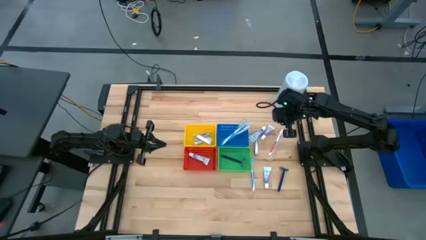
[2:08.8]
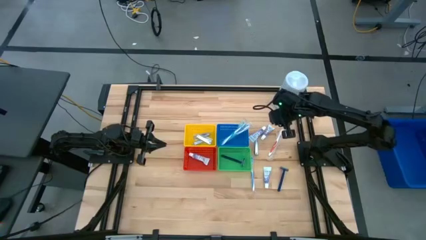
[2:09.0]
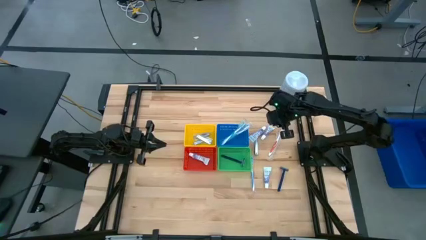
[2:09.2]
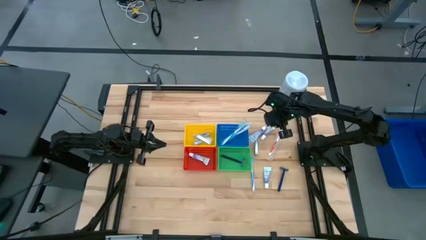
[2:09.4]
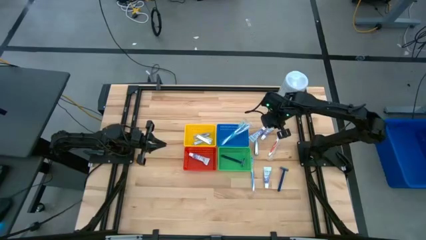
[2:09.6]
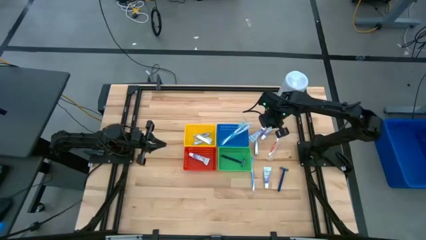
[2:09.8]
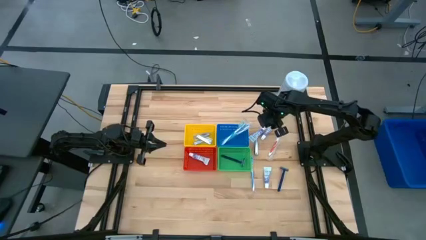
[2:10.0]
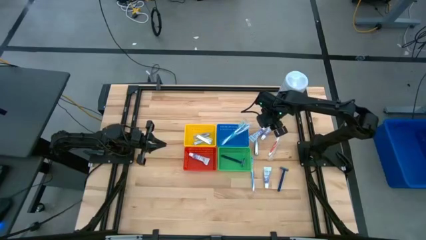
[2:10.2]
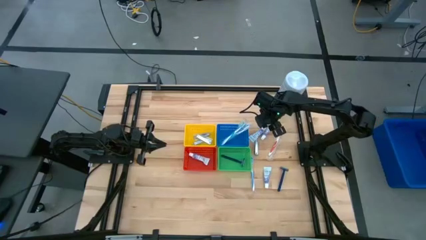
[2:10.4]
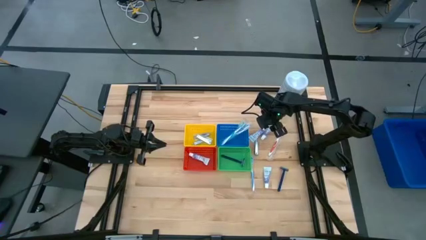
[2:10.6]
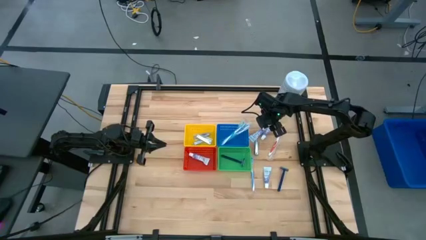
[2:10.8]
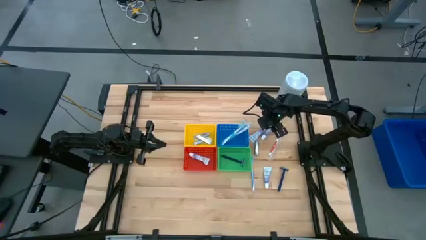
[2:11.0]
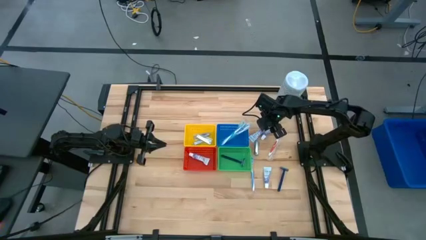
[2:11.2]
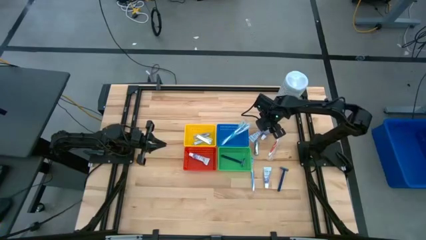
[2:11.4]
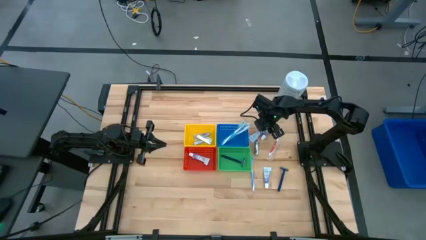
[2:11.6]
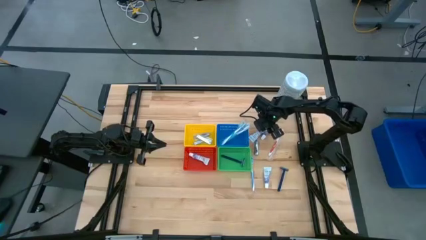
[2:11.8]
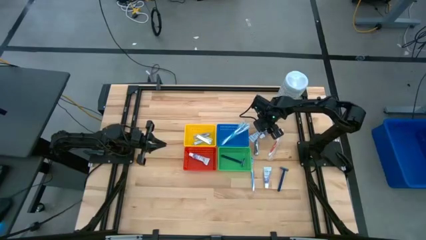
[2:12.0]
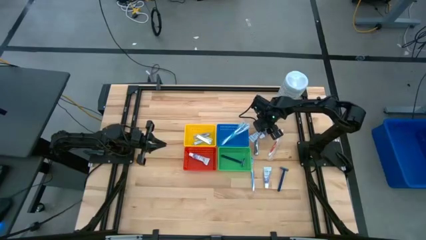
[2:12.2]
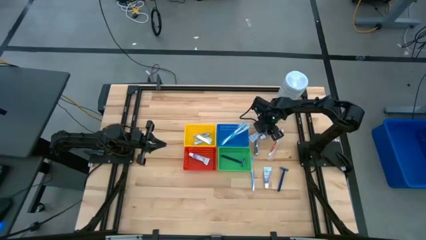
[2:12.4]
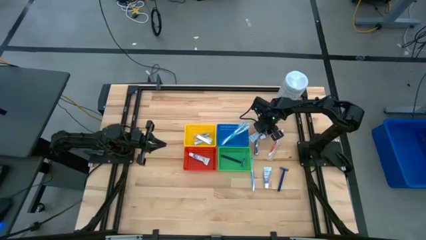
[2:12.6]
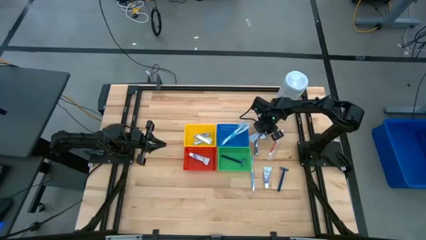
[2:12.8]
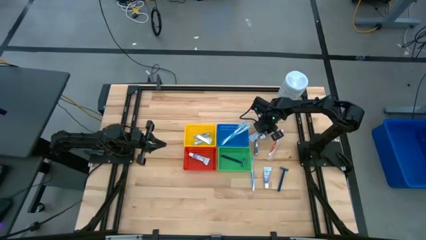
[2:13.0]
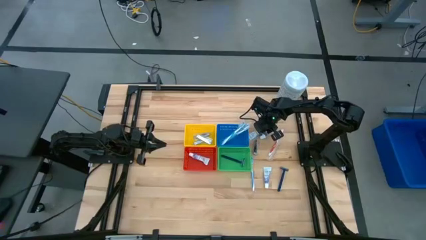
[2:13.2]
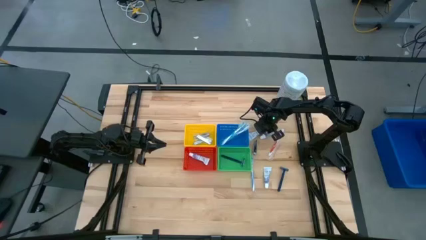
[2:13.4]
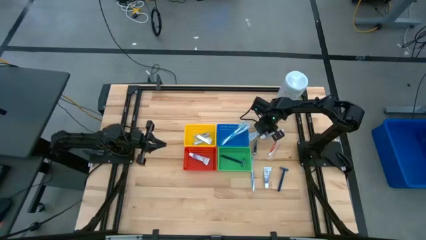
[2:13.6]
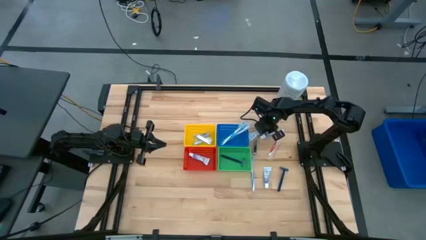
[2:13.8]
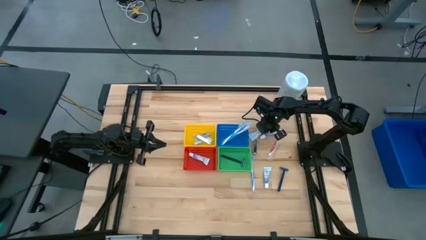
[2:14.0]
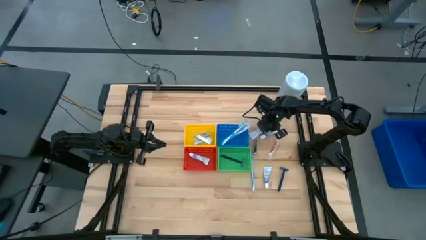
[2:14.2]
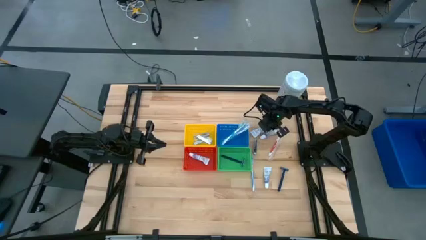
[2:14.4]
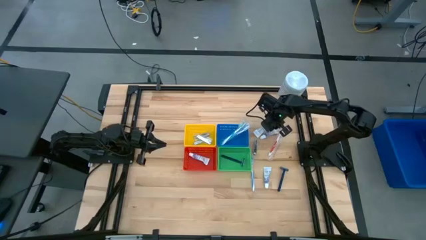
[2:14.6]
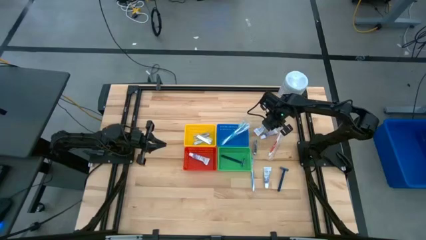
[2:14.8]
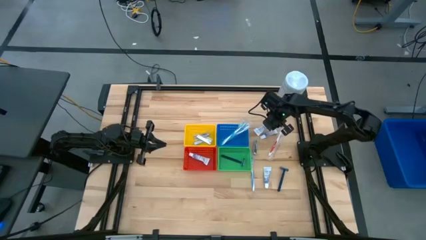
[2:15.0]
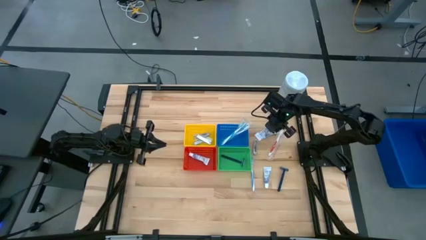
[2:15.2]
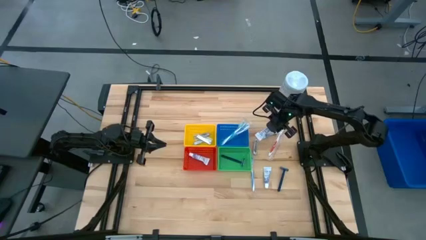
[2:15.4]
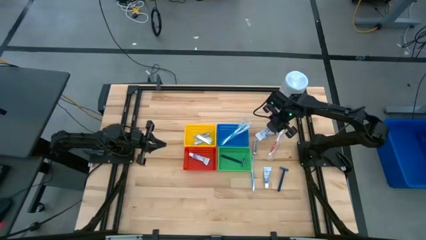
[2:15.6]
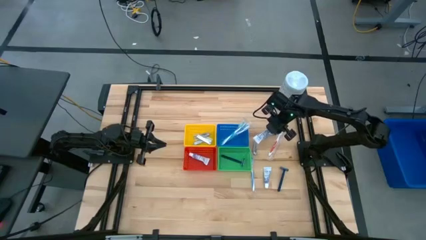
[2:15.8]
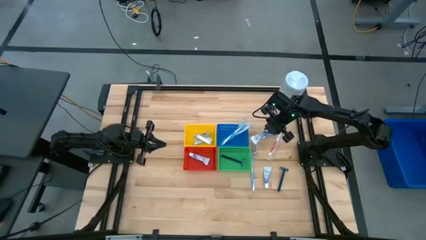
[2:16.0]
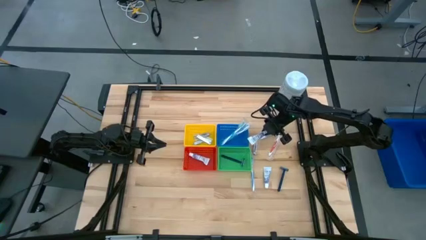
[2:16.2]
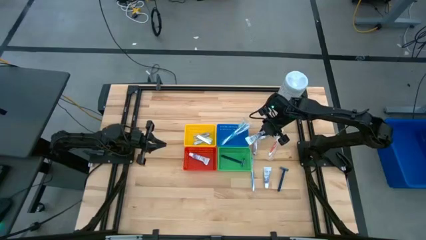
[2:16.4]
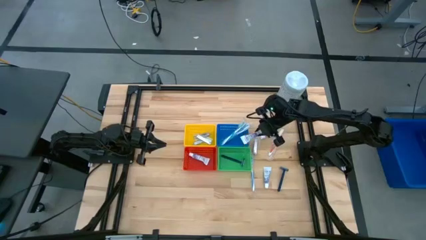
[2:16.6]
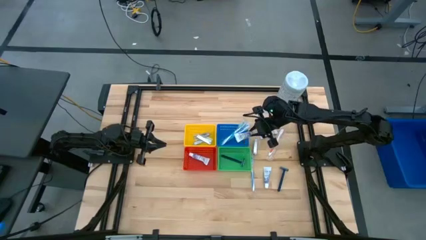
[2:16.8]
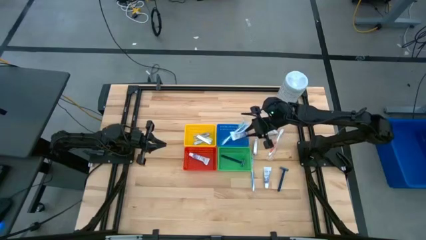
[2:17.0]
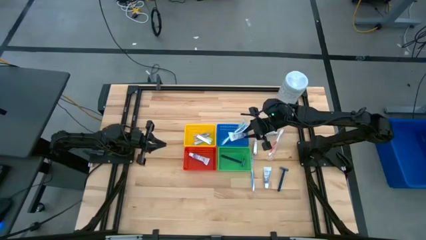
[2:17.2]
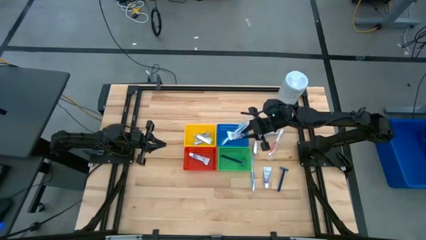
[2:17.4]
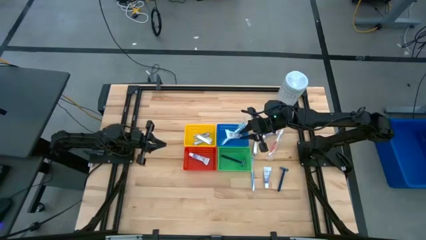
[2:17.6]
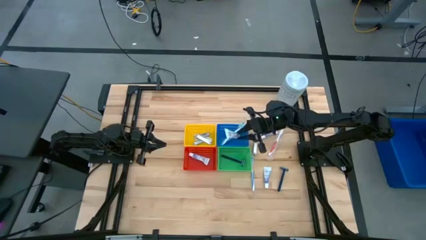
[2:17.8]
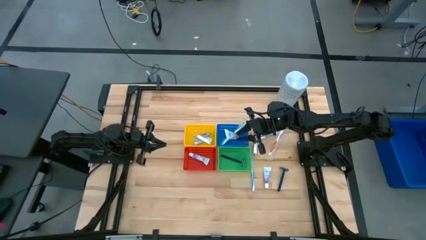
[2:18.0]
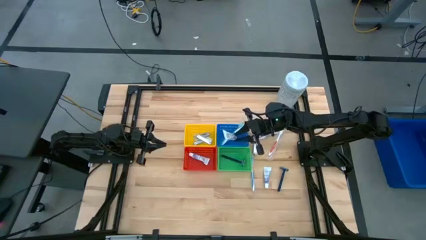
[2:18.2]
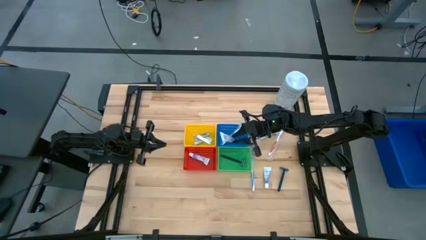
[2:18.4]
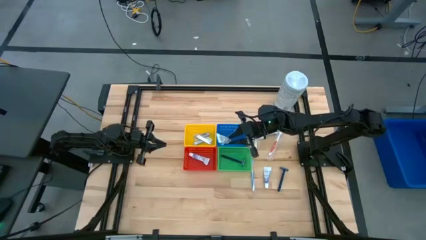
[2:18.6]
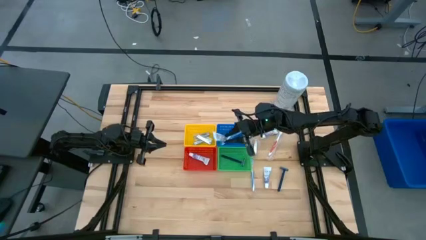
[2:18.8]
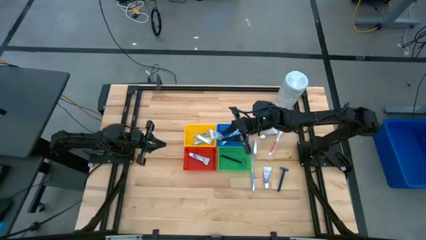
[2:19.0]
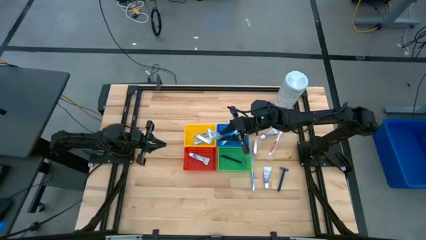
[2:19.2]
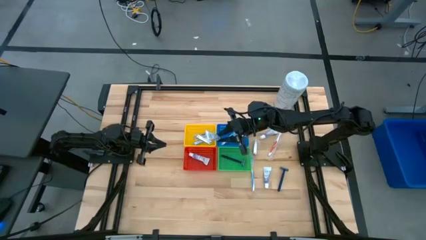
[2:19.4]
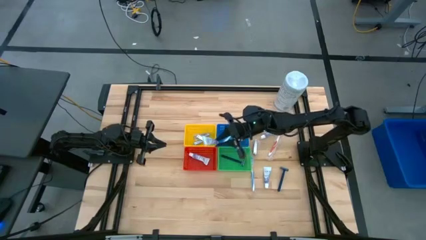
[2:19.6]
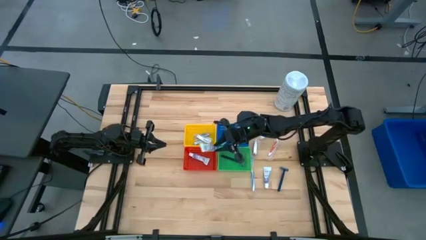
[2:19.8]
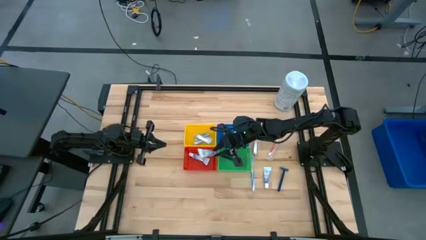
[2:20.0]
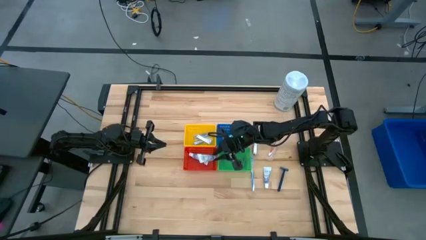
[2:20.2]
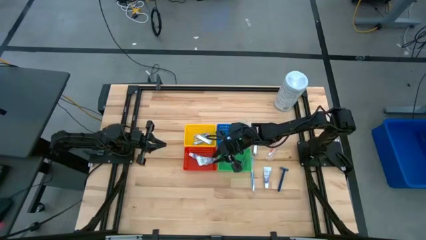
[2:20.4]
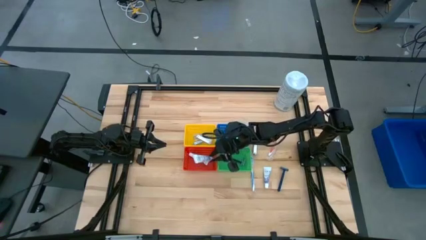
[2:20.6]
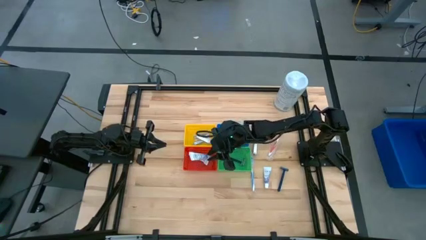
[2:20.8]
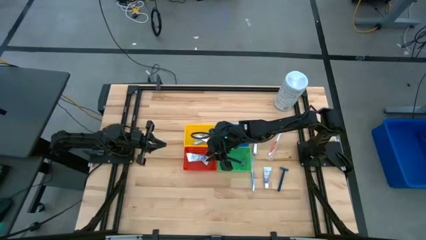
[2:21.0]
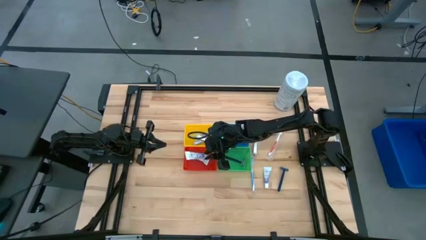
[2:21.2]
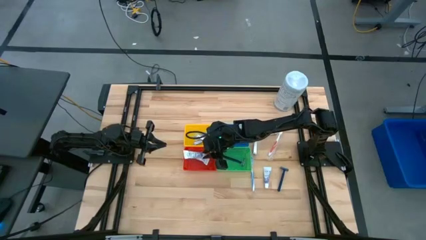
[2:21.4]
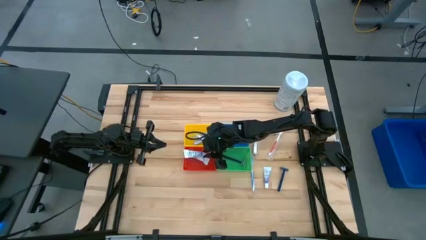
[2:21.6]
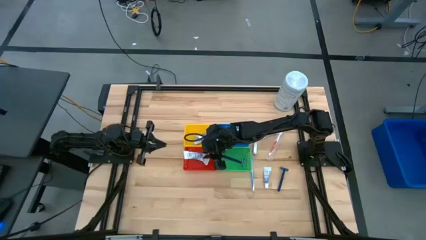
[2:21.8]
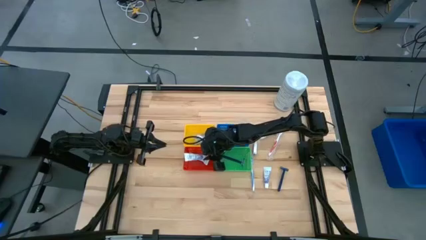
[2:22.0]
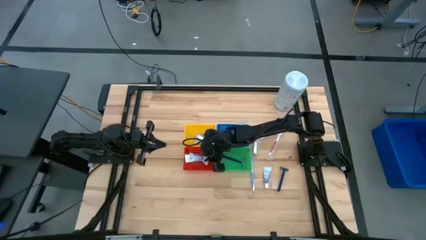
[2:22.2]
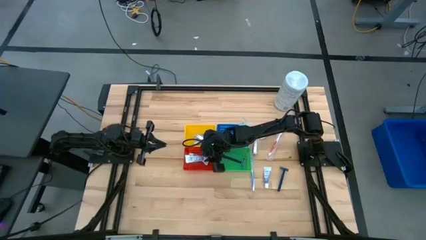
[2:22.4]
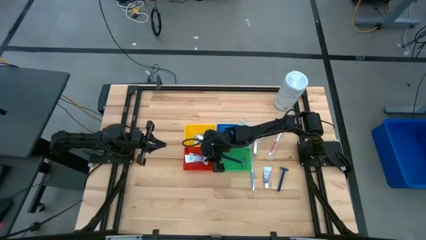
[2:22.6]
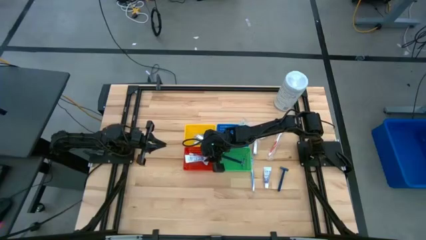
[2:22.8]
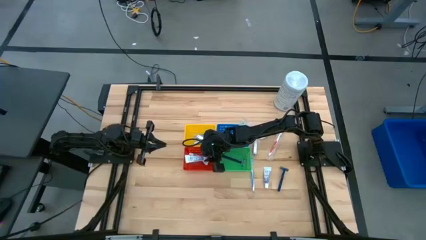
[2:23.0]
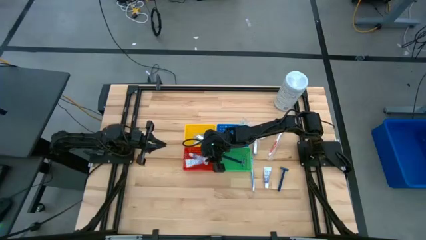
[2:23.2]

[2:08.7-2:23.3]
Task: Pick & Place Travel size toiletries
Put the top right toothpaste into the red bin

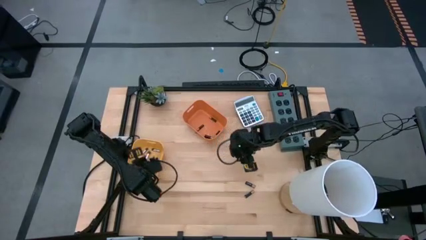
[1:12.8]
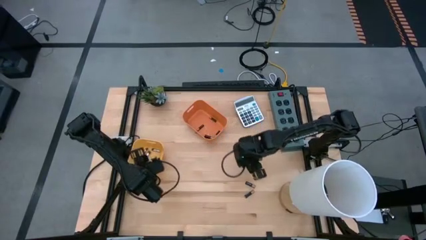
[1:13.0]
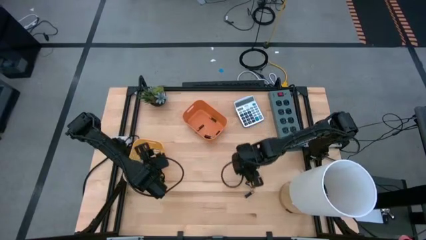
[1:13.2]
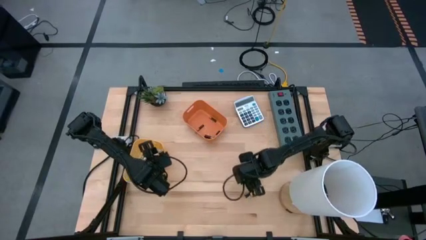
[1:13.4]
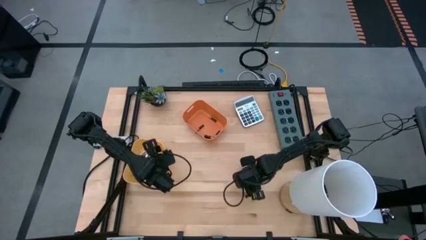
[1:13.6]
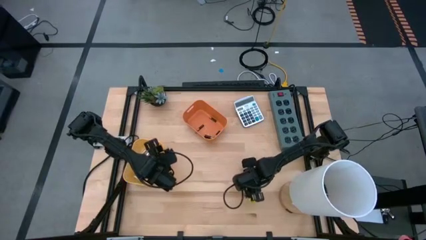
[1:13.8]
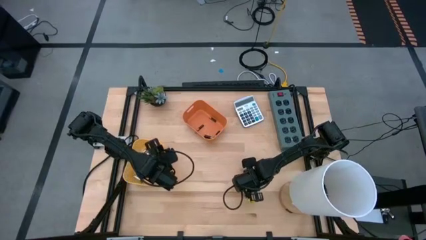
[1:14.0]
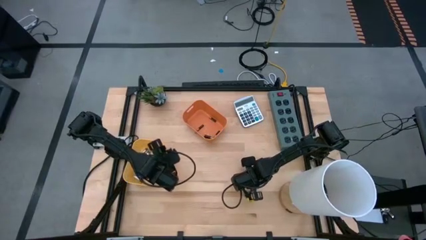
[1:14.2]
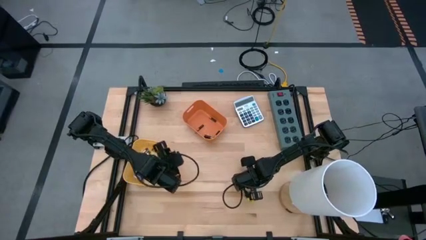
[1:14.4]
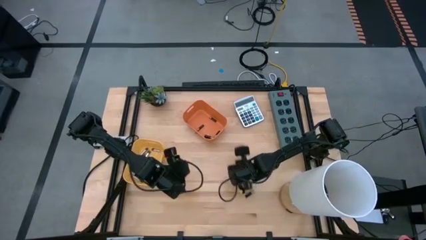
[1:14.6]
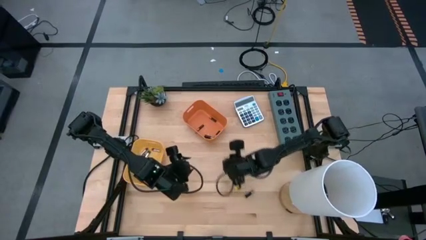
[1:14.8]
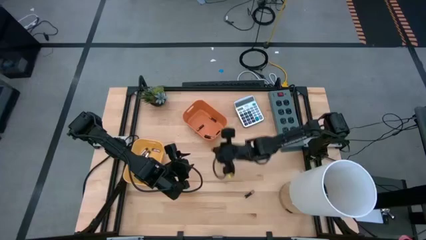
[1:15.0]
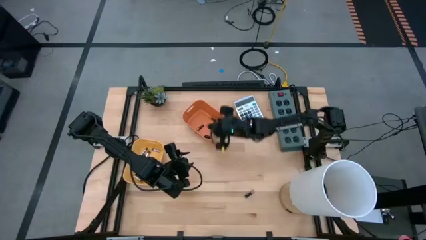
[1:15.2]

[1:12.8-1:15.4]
Task: Sort batteries
Put the black battery into the orange bin
